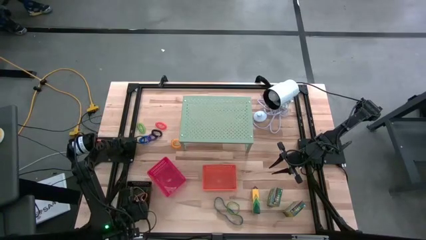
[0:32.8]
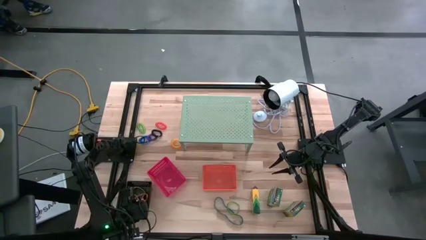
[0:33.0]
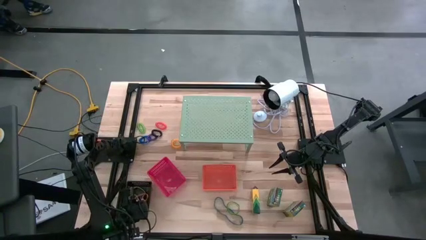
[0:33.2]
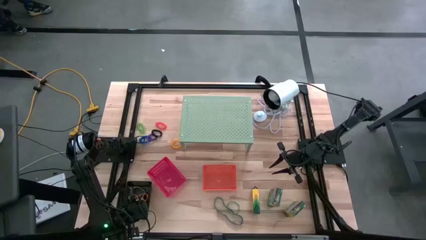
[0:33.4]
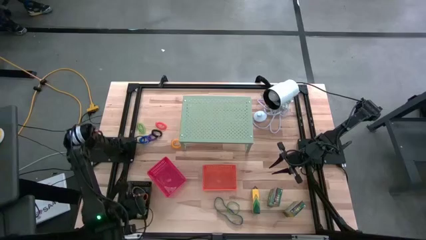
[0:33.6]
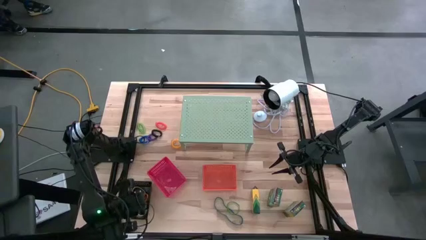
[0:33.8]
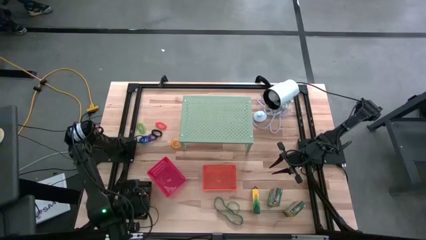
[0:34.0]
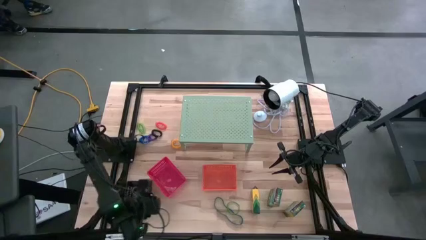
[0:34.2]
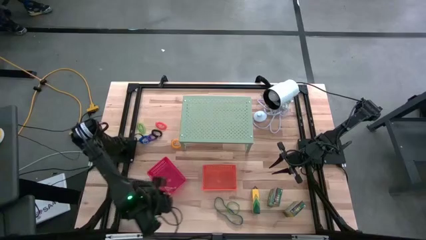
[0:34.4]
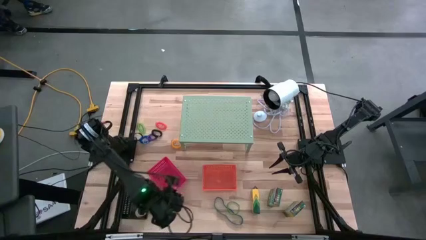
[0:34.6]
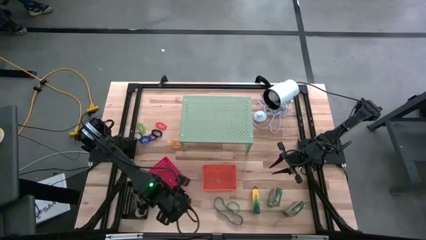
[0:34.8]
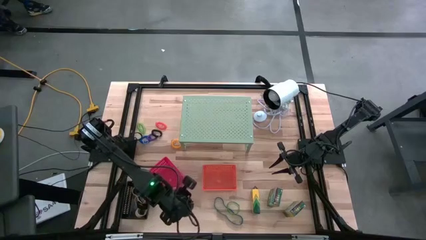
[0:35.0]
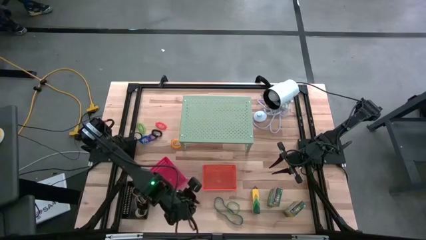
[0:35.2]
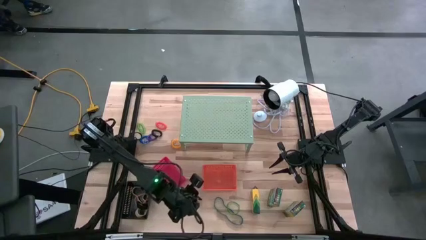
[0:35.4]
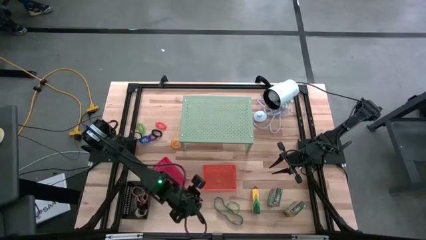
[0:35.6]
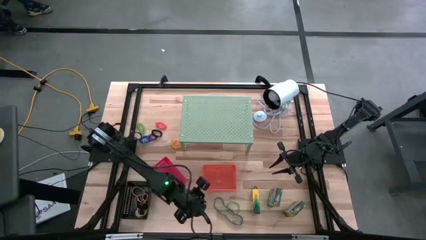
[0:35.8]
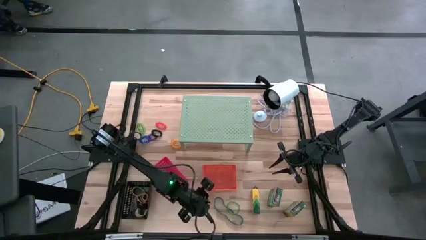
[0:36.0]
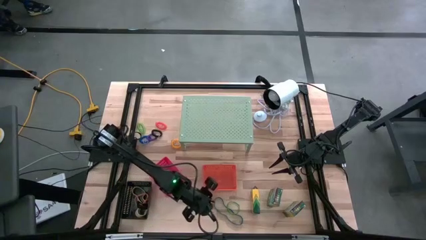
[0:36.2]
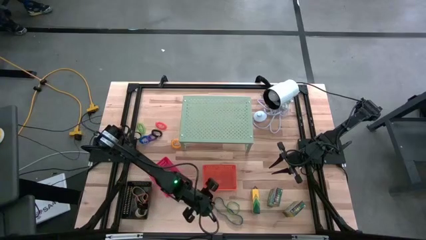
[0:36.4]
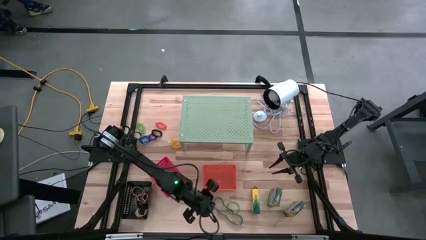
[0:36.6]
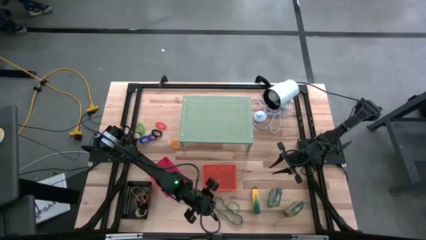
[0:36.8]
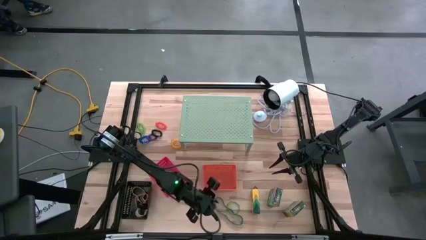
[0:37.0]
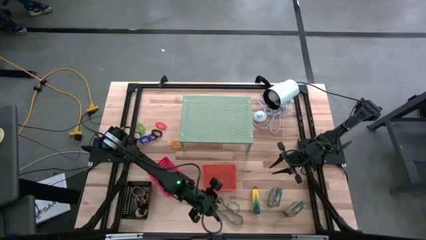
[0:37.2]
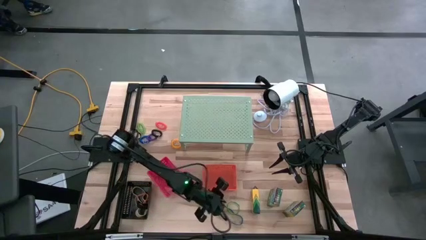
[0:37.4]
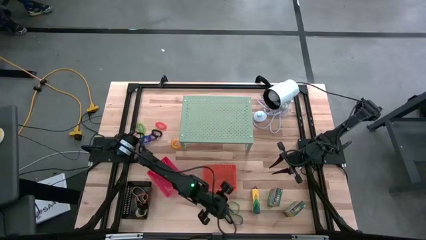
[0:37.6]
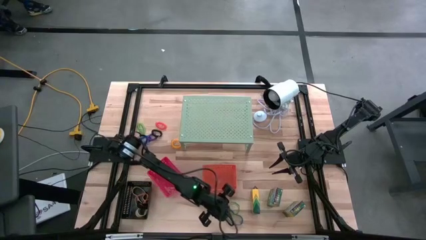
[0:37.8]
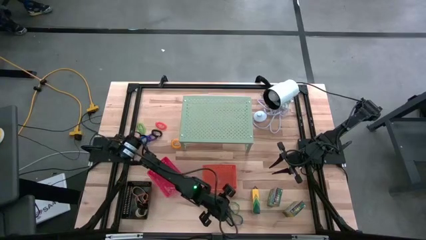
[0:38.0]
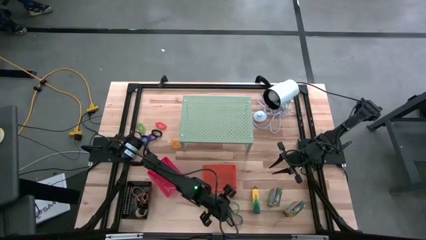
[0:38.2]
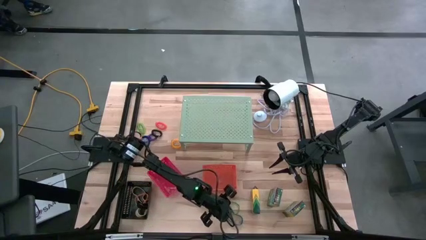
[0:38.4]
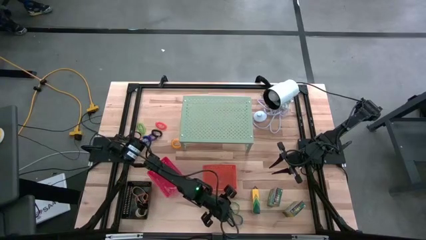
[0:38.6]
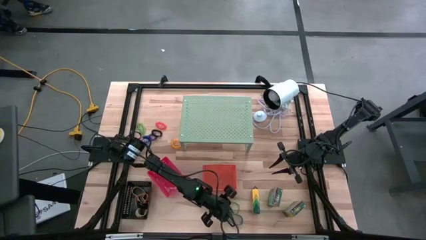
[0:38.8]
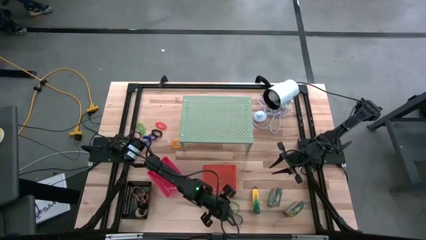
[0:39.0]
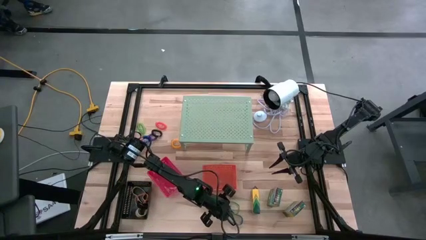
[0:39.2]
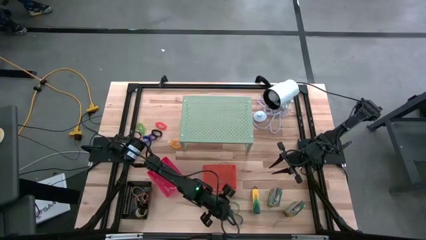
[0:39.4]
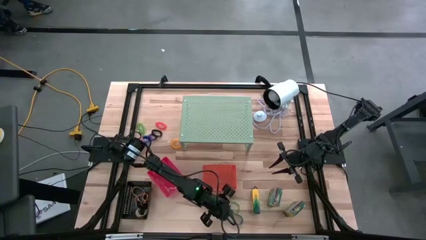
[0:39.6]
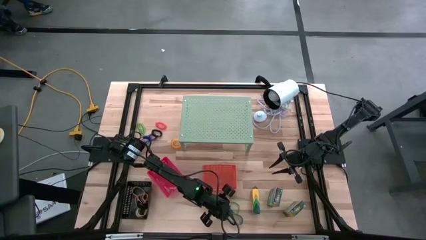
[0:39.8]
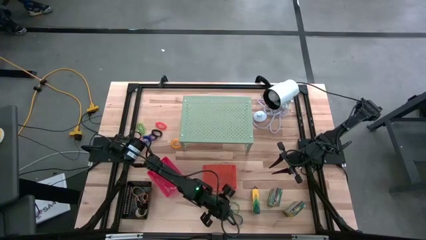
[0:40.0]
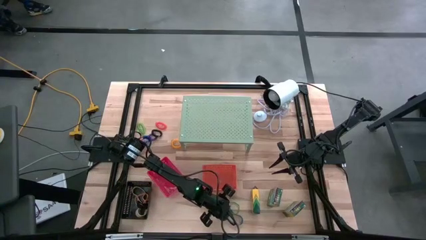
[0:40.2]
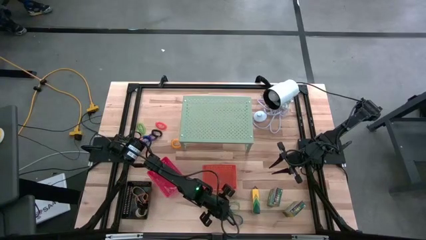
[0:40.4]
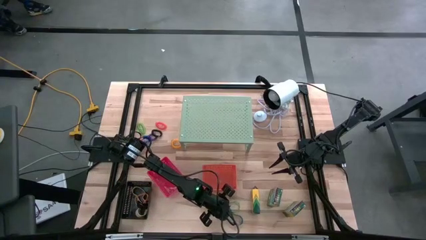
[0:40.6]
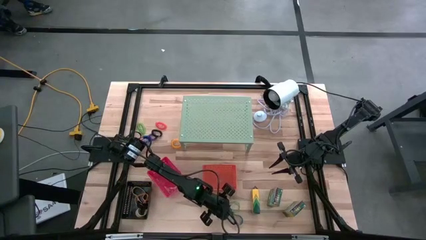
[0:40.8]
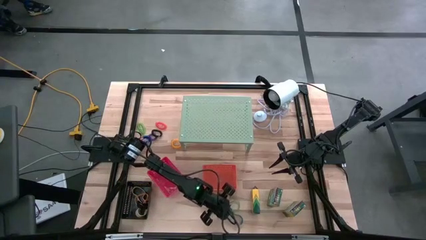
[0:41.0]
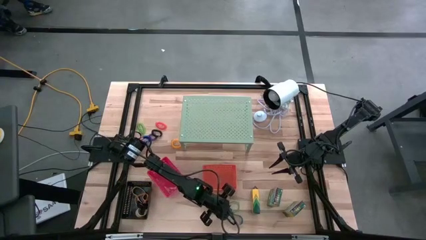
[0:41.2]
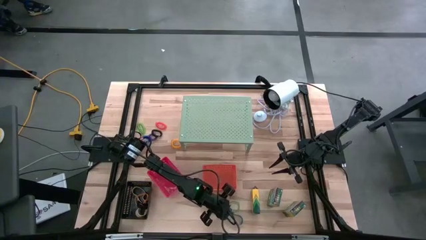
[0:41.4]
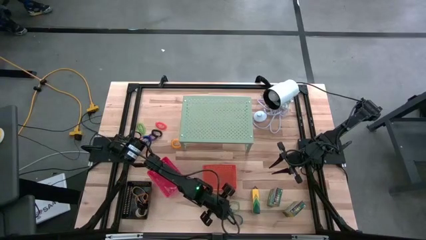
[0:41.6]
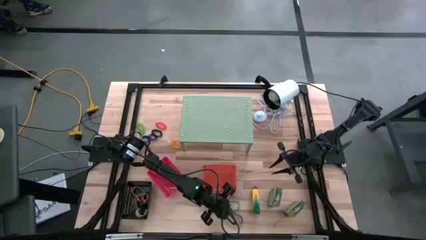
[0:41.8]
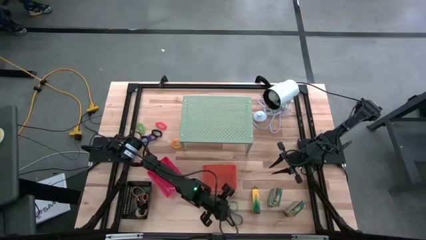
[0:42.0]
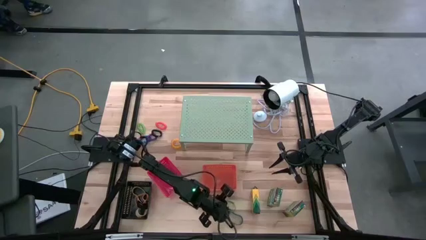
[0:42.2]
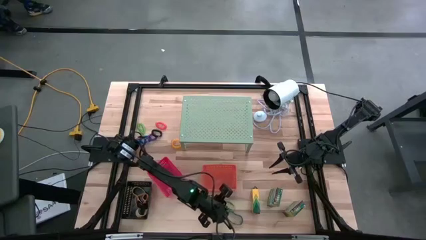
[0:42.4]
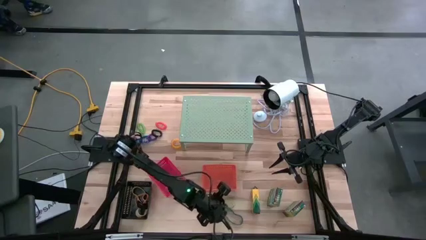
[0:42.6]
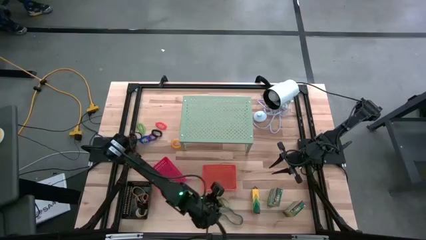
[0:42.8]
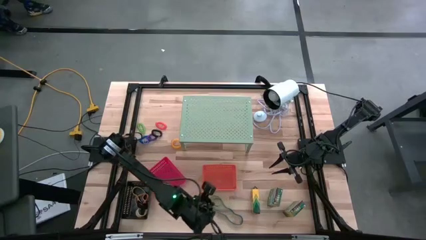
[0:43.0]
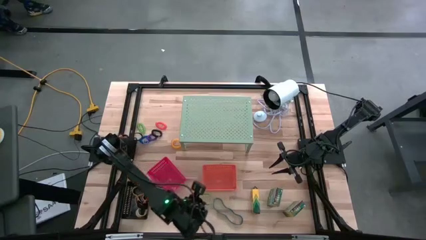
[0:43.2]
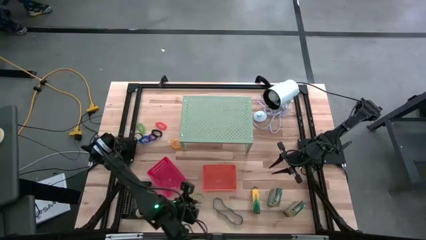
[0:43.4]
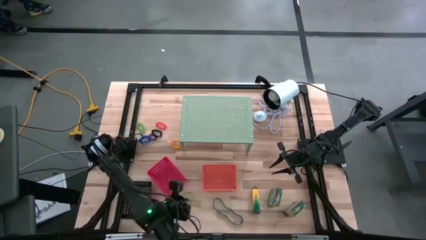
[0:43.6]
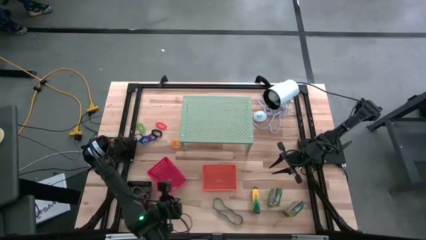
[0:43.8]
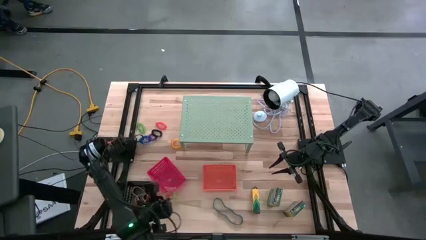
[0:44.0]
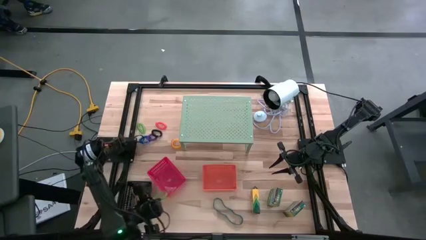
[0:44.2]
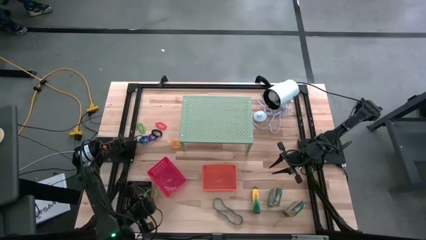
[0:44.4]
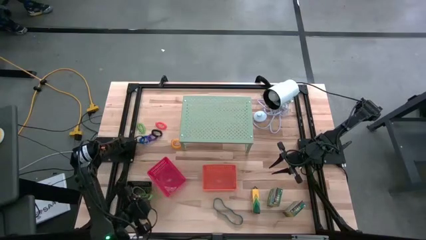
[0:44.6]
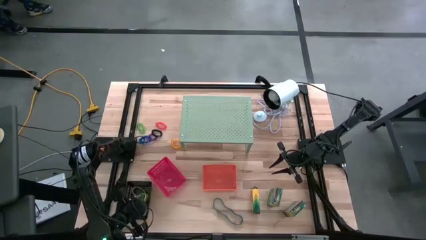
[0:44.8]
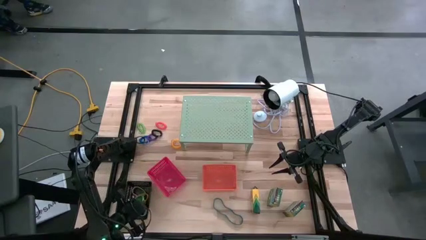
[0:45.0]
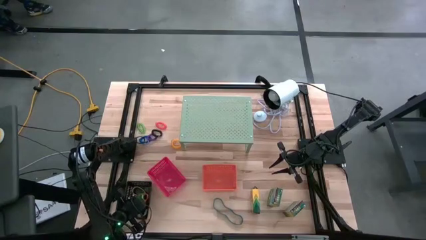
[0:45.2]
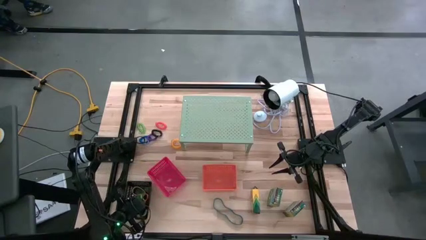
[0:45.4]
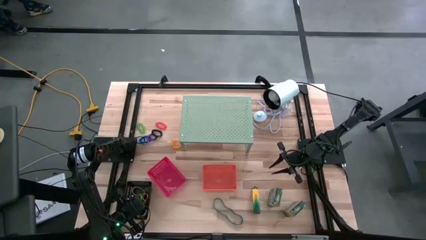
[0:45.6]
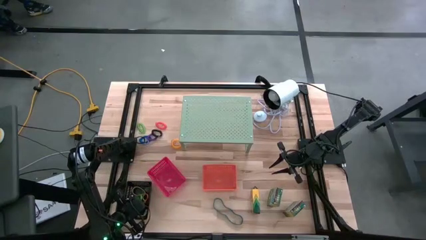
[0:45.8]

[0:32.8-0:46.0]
Task: Pick & Place Office Desk Supplies
Put the green rubber band into the black bin

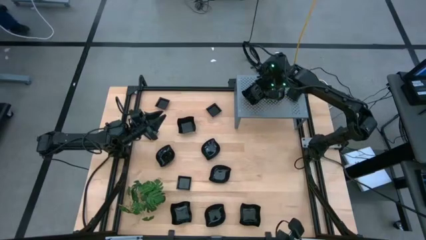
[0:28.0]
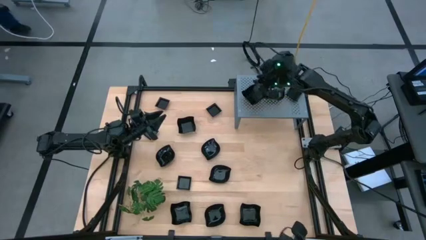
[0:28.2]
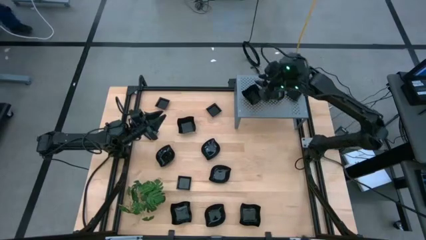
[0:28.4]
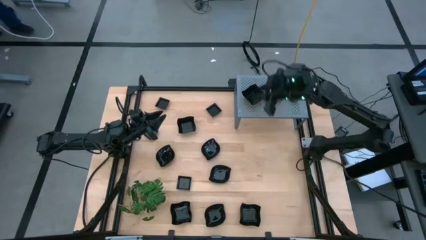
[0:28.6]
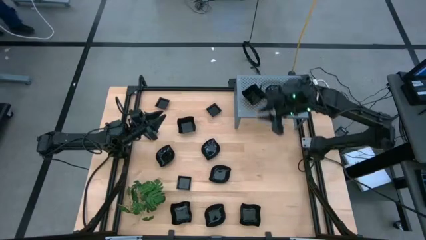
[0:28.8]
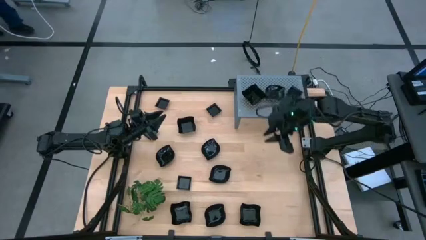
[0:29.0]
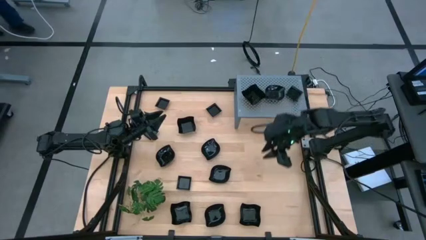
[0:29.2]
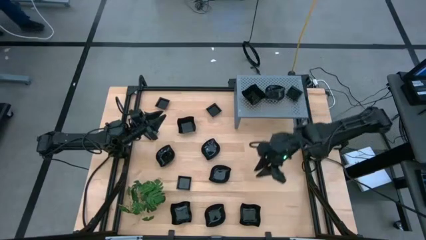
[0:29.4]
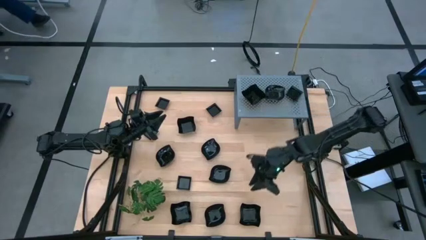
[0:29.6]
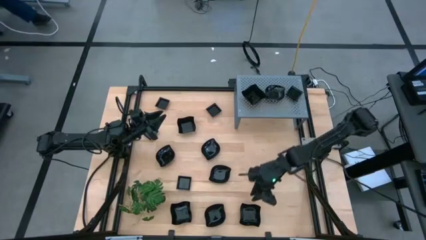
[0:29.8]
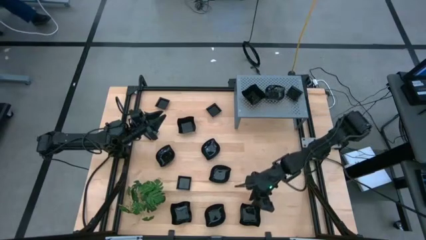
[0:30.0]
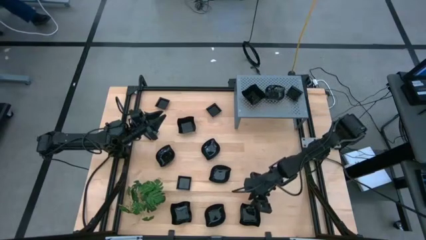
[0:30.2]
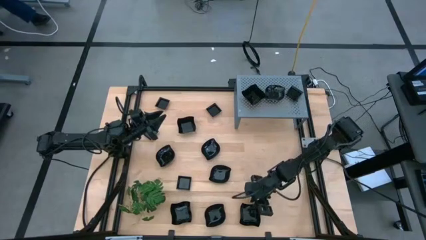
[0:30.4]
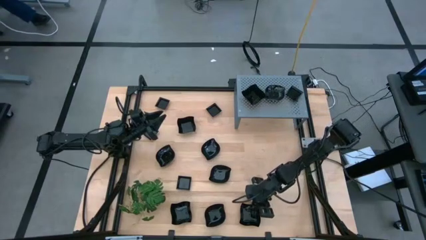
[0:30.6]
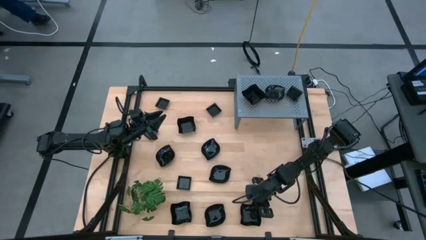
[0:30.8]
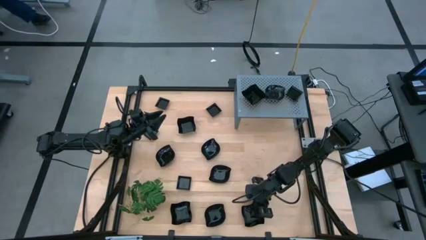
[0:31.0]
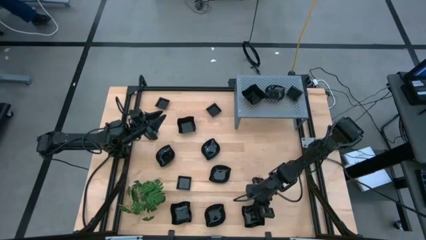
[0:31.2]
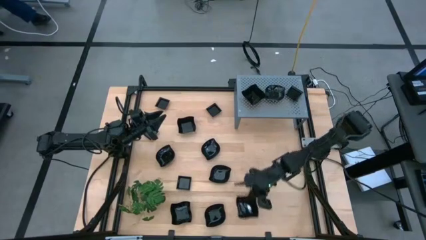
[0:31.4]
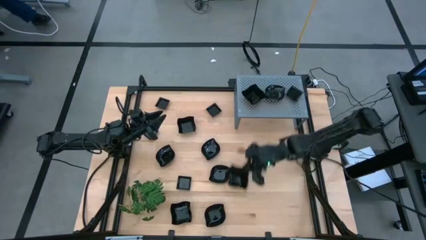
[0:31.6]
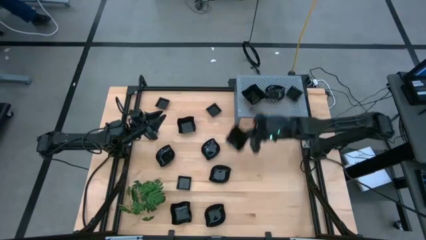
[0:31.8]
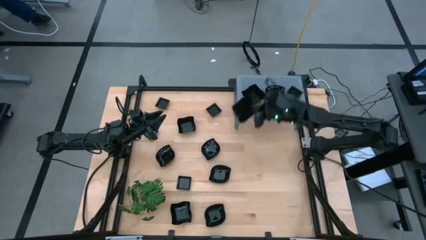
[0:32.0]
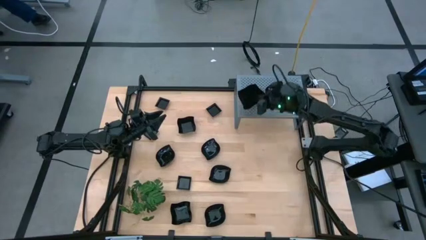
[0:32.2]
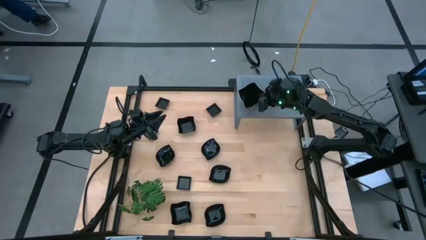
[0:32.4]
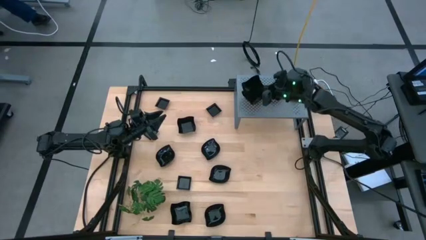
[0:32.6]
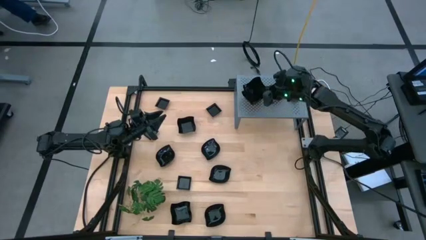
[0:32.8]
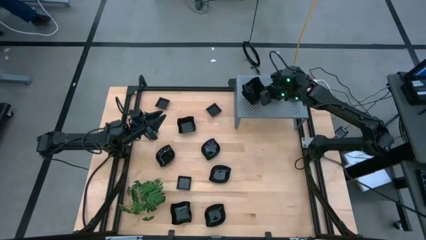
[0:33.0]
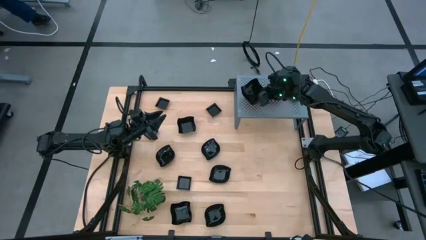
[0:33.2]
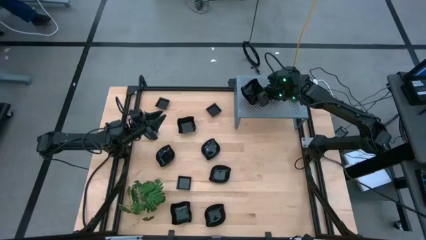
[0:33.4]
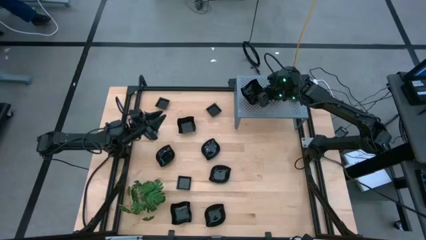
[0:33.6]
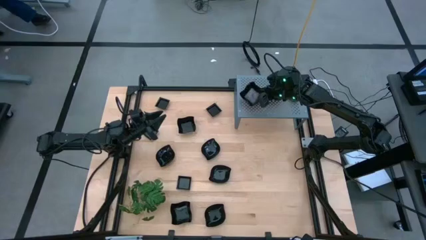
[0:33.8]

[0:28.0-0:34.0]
Task: Pick & Place Mini shaped plates
Stack the black distorted square plate on top of the black distorted square plate on the shelf
